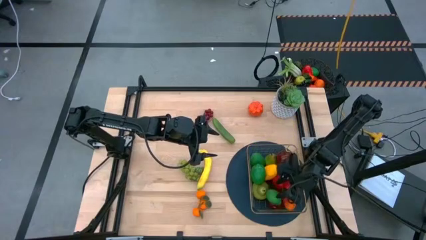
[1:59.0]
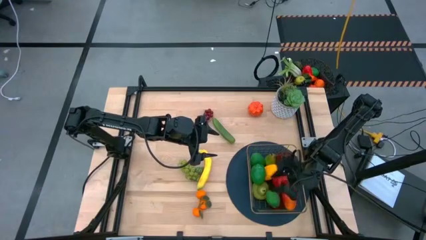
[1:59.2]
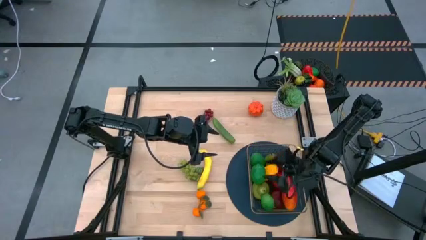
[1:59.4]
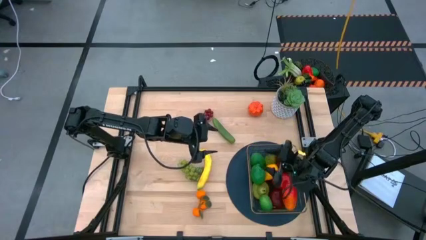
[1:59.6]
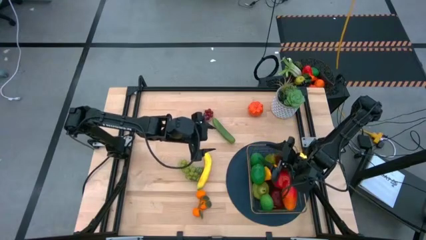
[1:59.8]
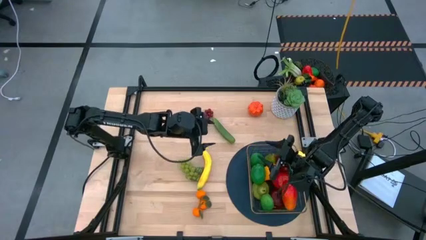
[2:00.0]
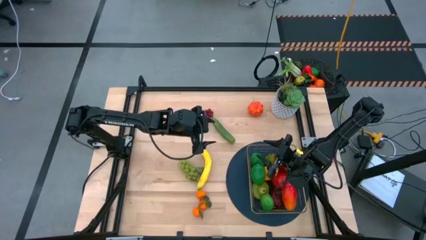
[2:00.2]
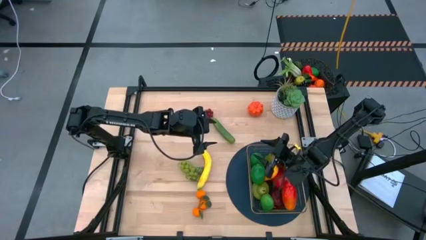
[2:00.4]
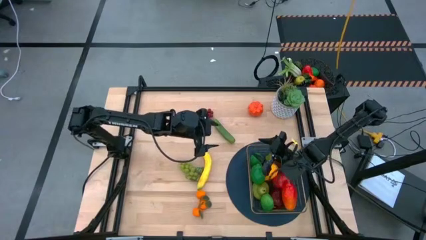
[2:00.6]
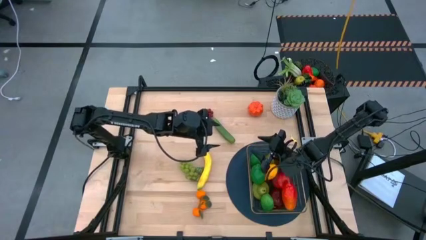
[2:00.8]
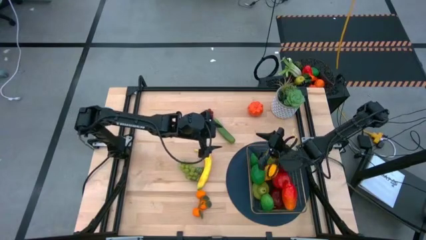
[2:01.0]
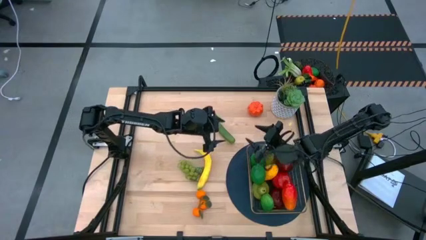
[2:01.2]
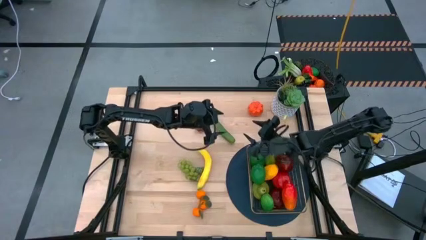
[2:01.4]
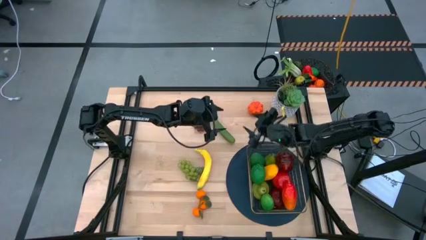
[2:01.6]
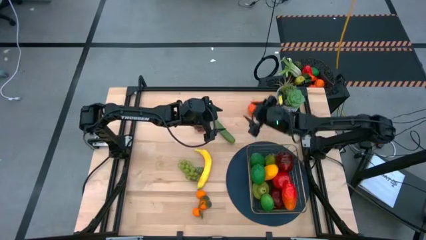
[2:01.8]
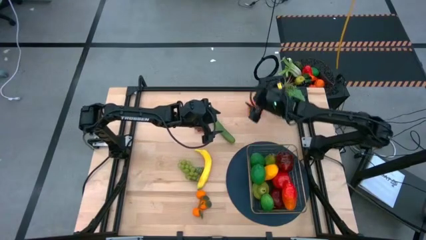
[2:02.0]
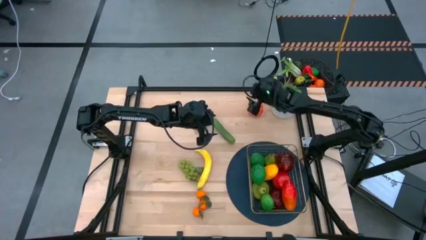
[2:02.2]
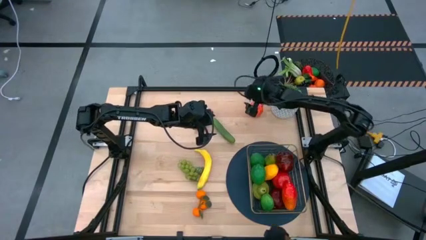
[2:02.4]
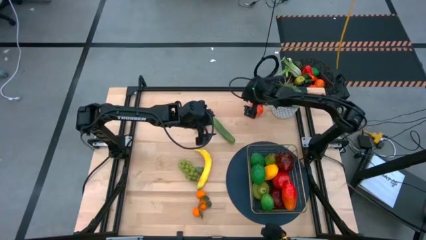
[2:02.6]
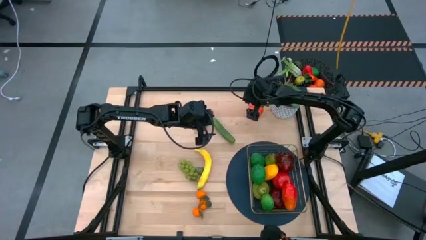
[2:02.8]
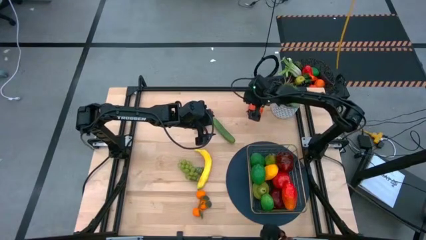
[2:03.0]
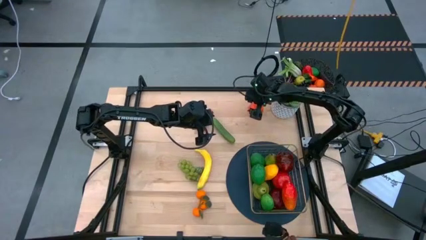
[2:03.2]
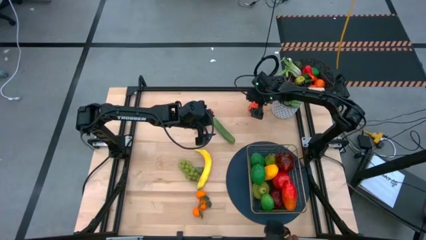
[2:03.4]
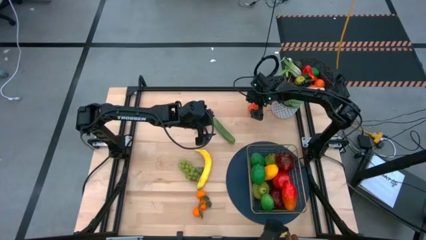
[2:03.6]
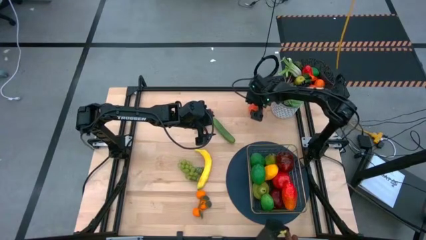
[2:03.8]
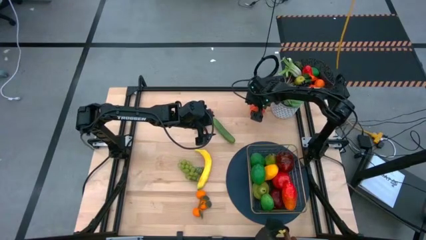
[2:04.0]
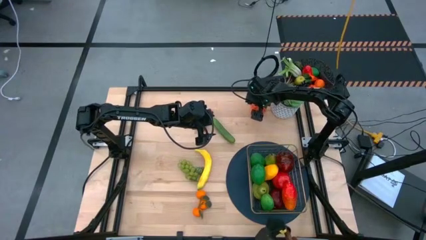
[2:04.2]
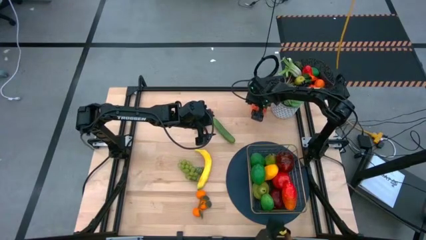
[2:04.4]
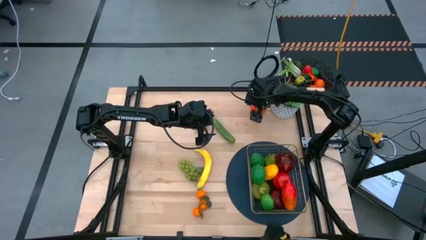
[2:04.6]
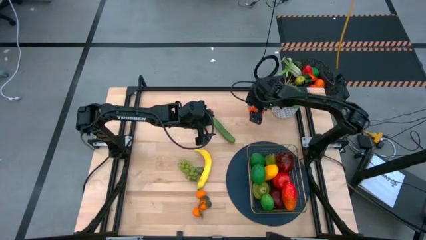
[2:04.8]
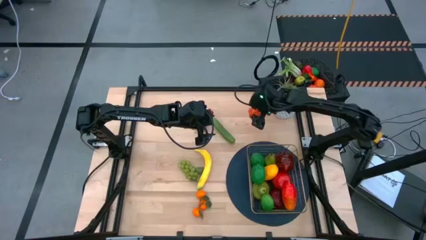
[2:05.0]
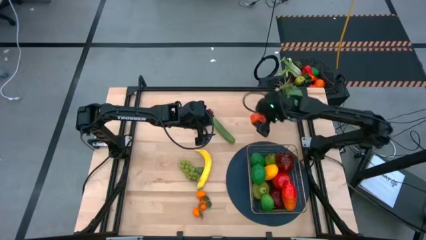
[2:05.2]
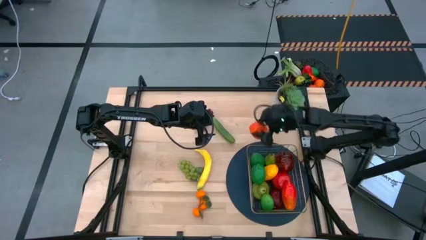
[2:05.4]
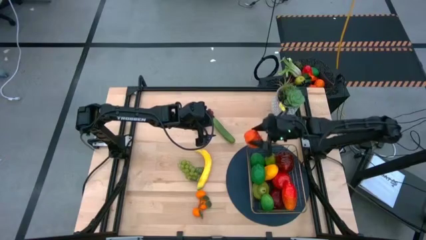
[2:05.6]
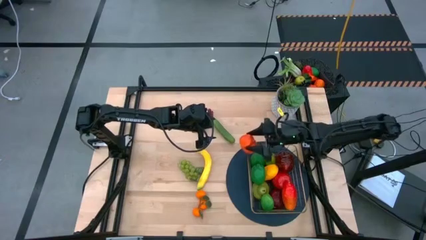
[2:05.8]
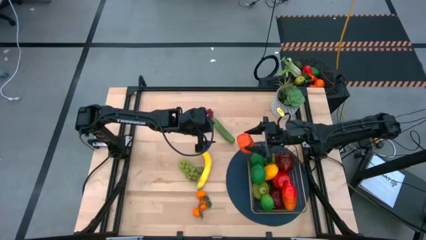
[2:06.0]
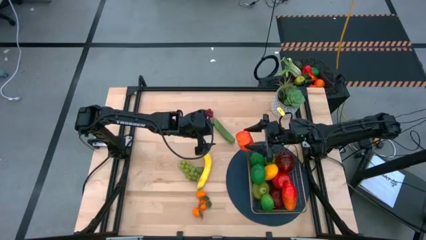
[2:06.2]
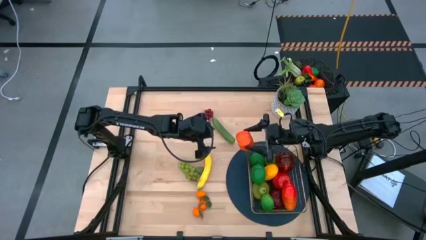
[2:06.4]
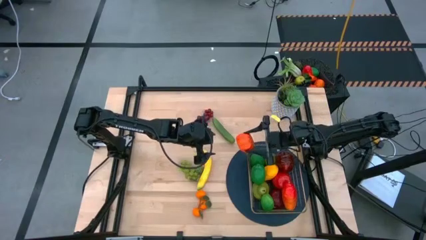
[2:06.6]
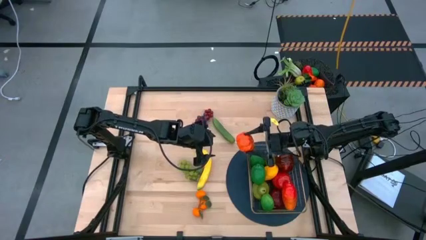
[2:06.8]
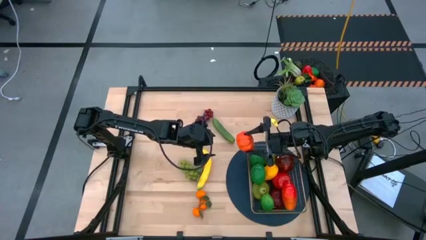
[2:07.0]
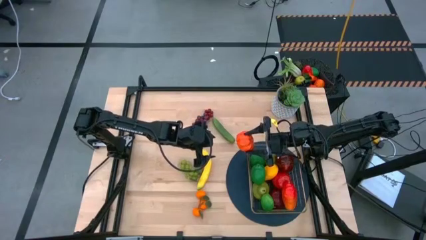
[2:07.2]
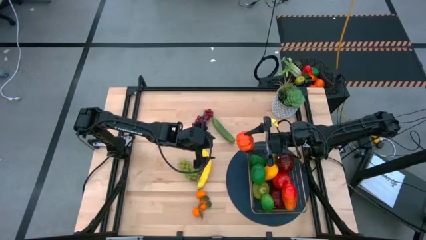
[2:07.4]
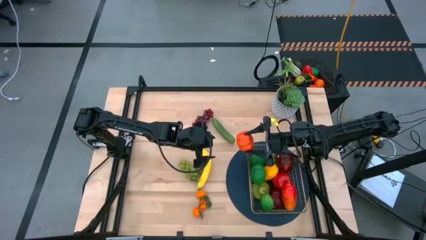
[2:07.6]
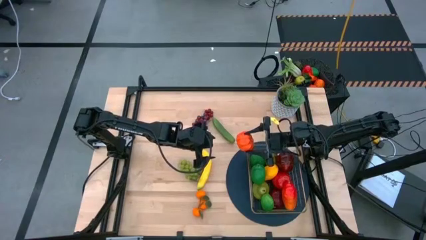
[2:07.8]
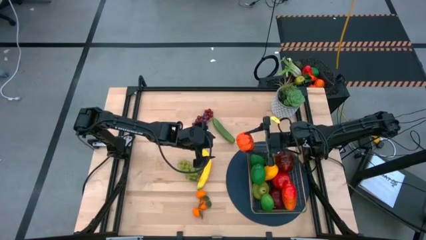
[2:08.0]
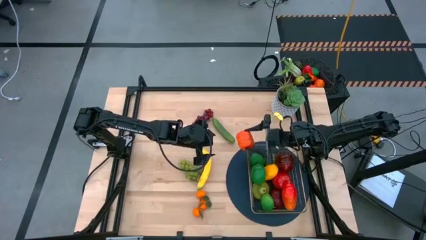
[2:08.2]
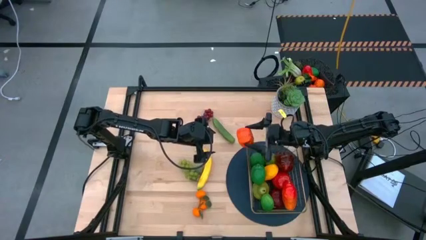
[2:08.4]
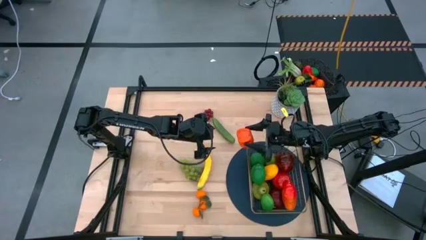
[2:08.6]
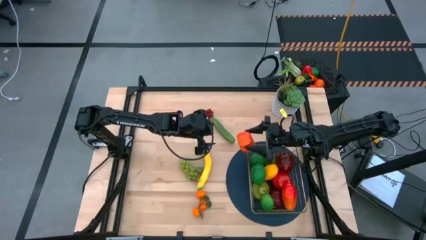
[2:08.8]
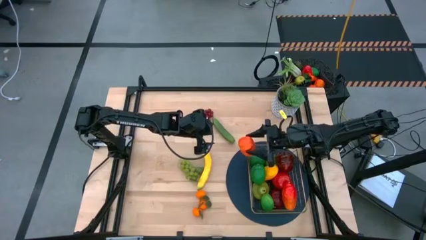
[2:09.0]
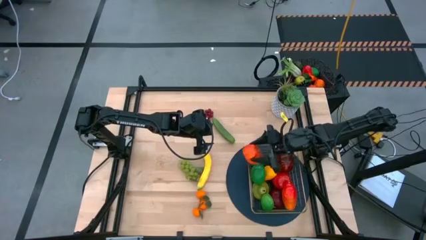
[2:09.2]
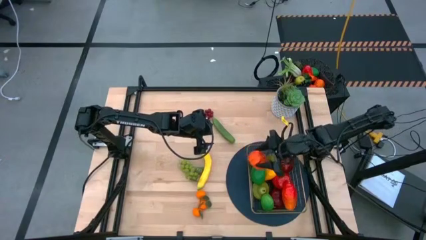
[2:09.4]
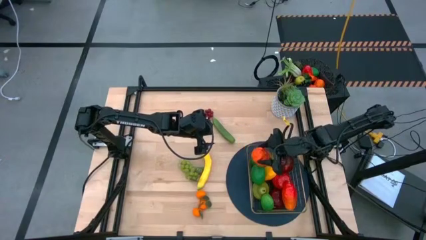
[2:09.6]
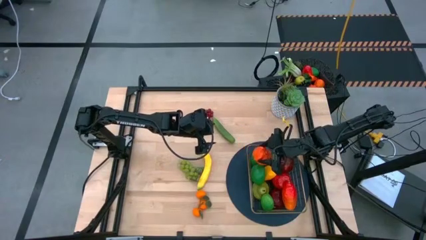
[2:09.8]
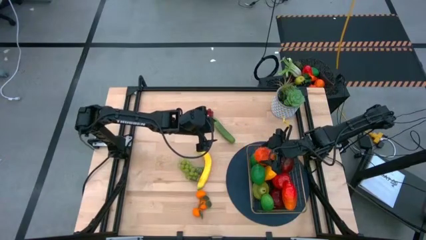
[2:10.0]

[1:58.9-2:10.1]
Task: Build produce basket
Put the tangerine into the wire basket

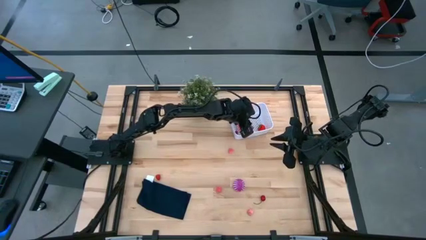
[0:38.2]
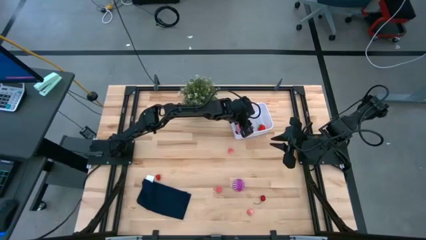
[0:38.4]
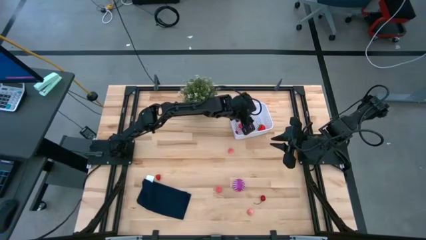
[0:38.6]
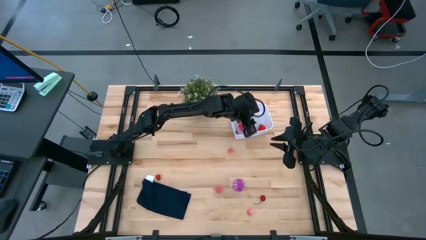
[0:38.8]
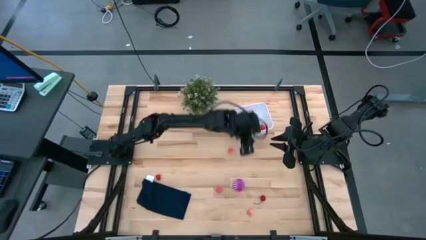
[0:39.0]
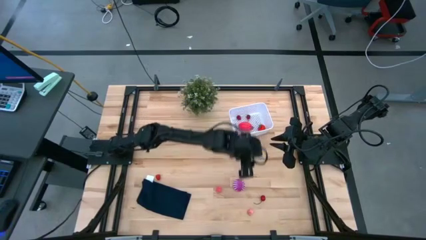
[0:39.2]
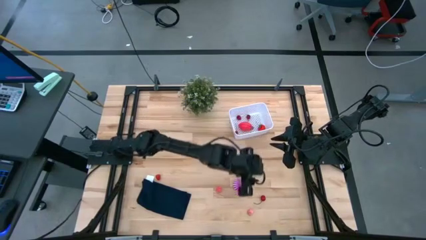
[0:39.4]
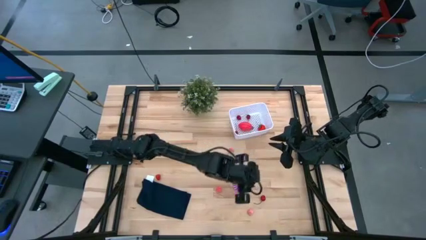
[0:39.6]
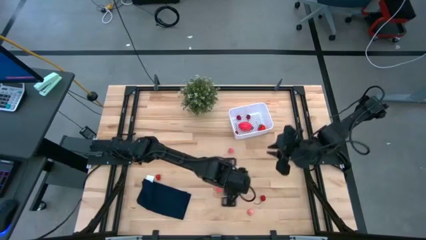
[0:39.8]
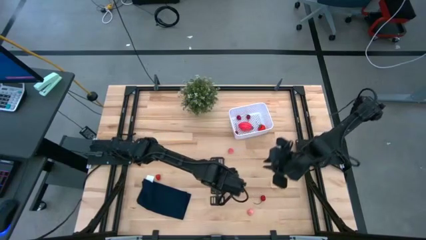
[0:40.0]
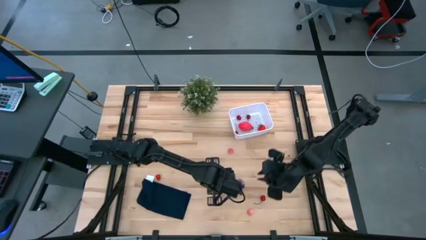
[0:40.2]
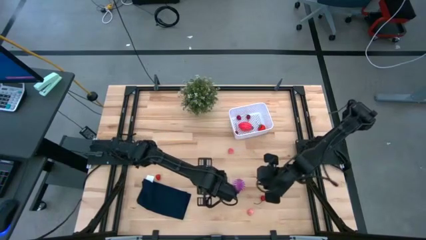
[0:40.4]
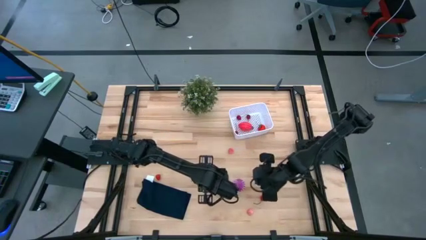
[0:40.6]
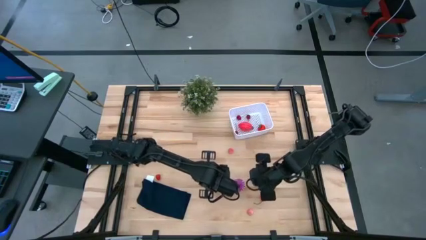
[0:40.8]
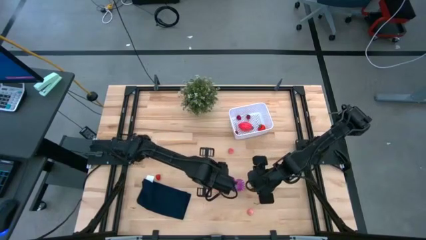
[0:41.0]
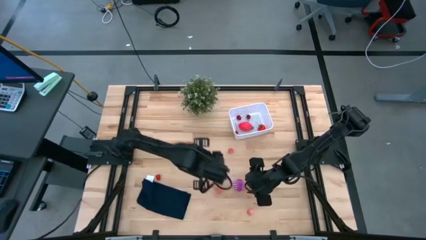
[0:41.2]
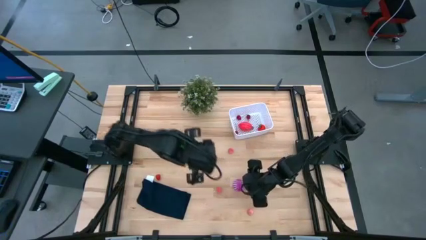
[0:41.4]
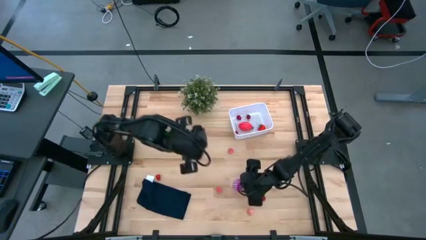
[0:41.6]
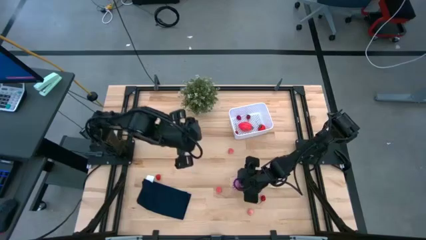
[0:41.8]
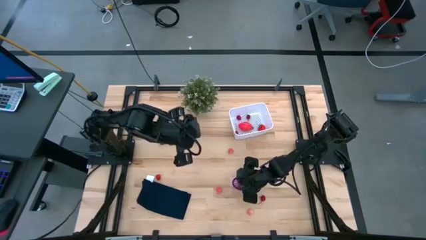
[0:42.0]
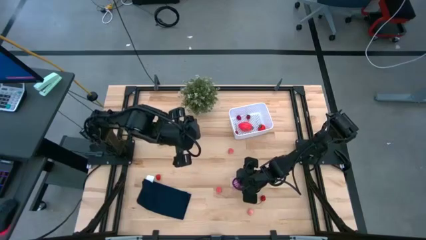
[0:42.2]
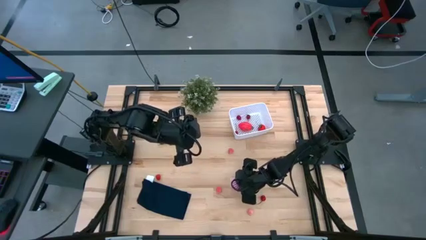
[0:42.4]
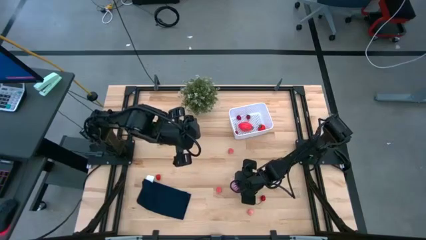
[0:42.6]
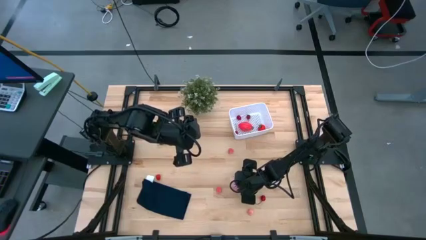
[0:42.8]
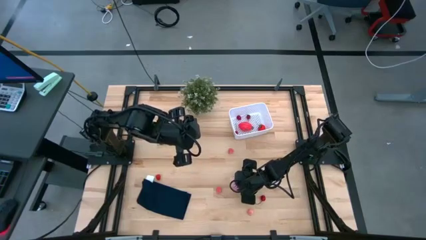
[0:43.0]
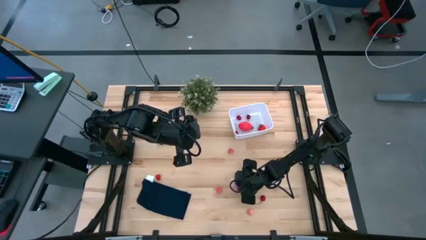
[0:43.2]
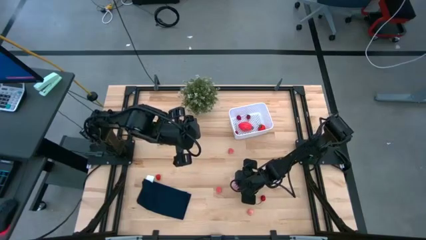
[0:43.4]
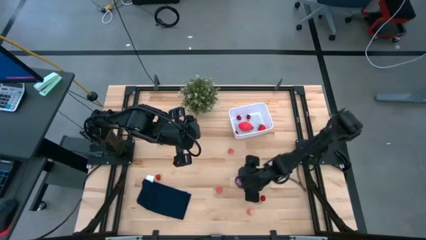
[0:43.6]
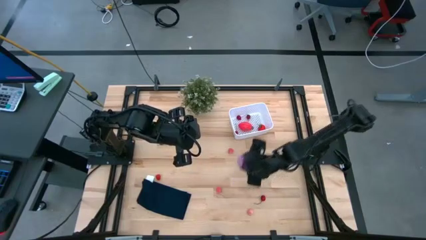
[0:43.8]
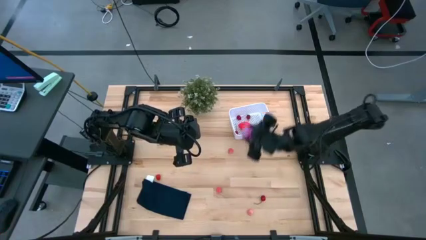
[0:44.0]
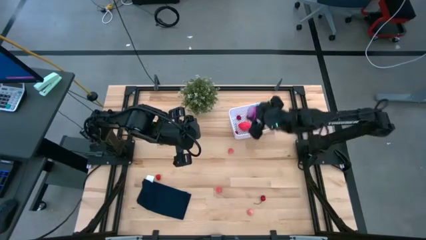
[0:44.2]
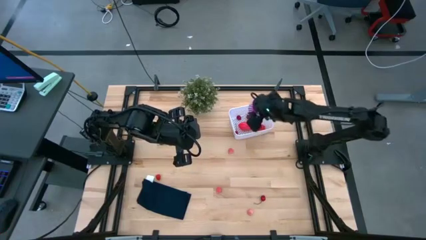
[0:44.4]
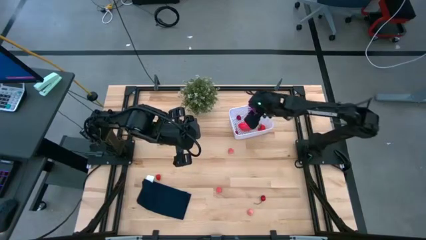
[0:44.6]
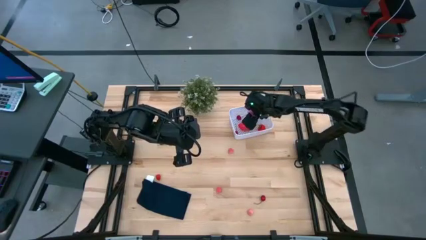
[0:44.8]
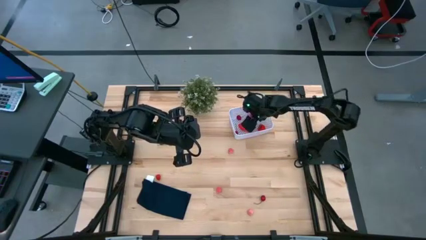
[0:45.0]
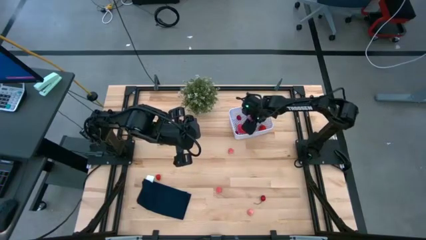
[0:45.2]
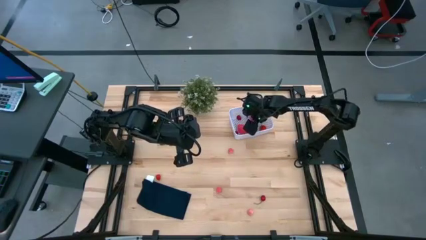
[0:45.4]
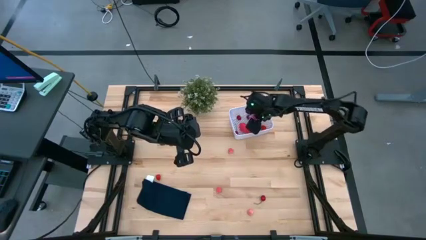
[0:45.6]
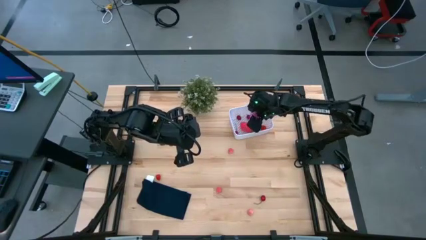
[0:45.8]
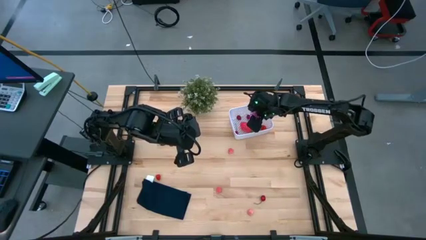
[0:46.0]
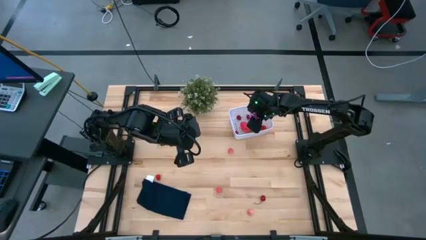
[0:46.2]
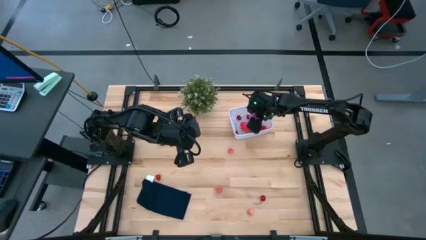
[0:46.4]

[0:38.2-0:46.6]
Task: Pick and placing Produce into tupperware
Put the onion into the bin
